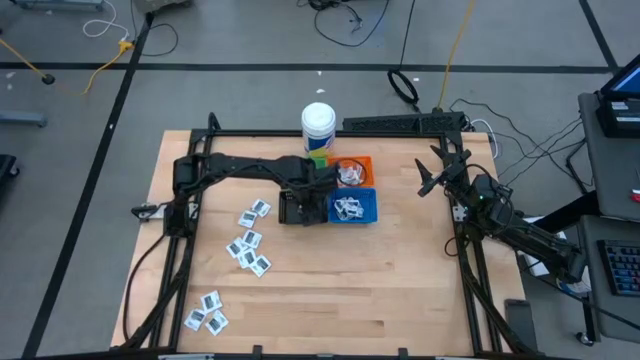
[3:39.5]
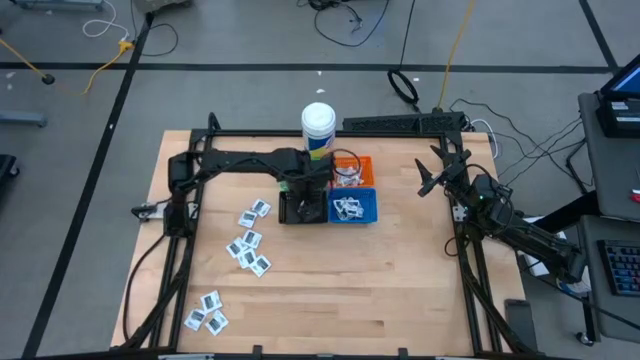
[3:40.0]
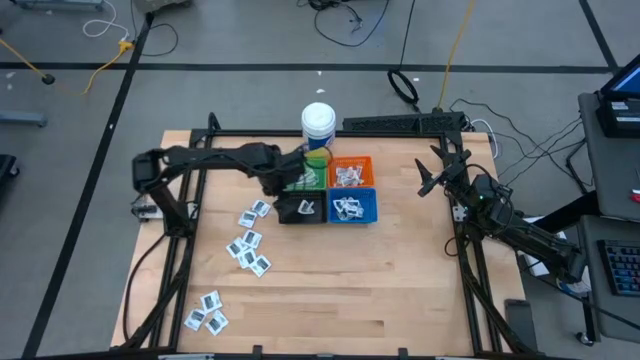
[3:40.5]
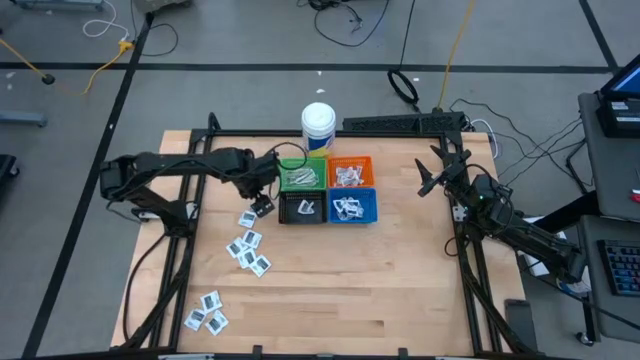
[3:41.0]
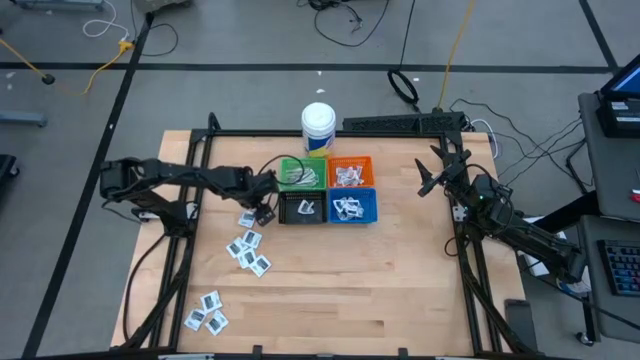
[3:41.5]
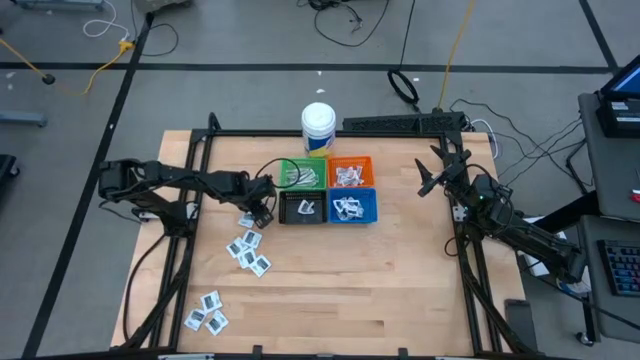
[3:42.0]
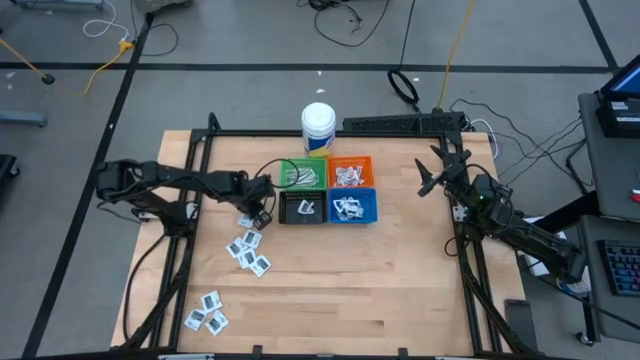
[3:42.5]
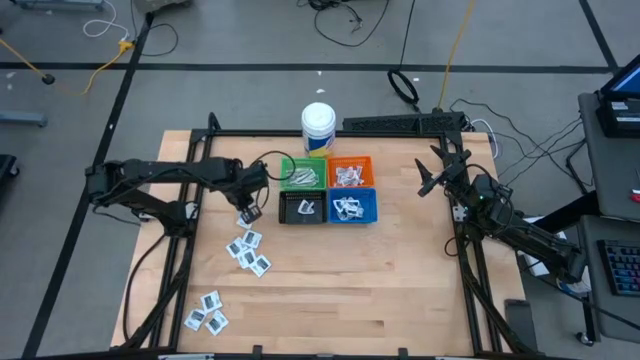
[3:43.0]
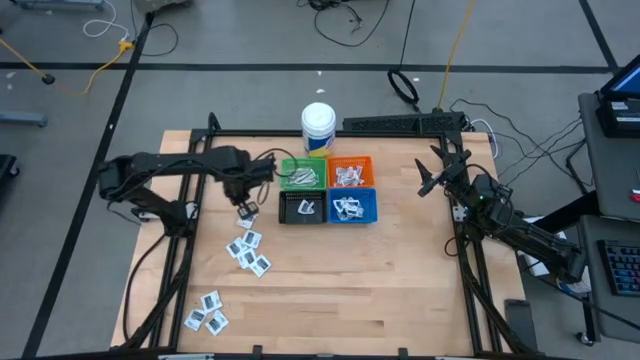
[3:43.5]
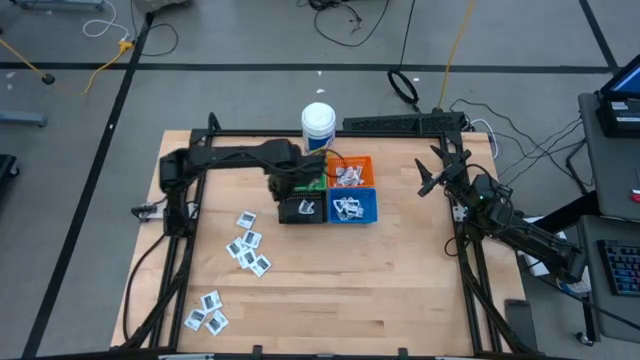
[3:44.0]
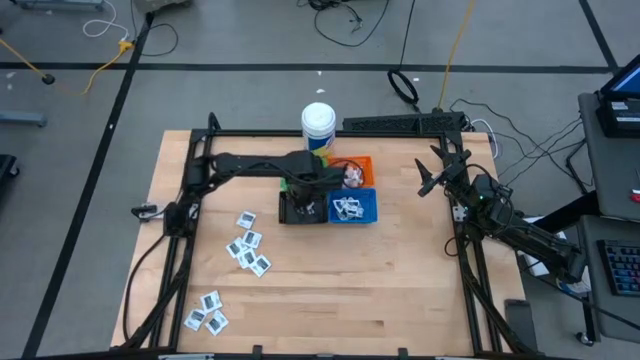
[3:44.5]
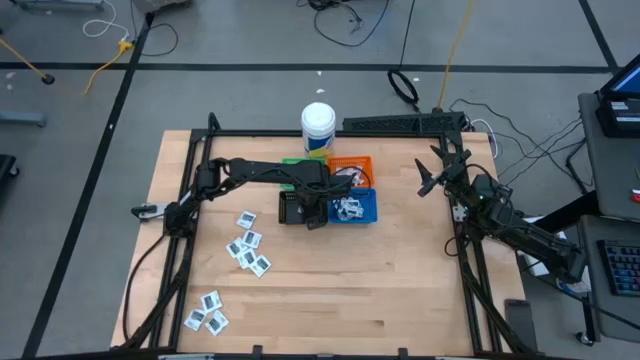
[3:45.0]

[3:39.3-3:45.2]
Task: Pick & Place First Aid Supplies
Put the black towelette pack into the black basket

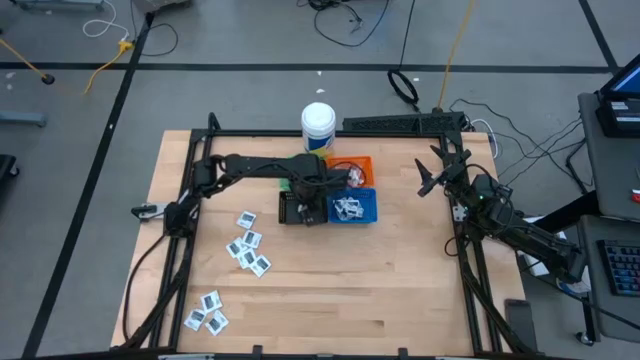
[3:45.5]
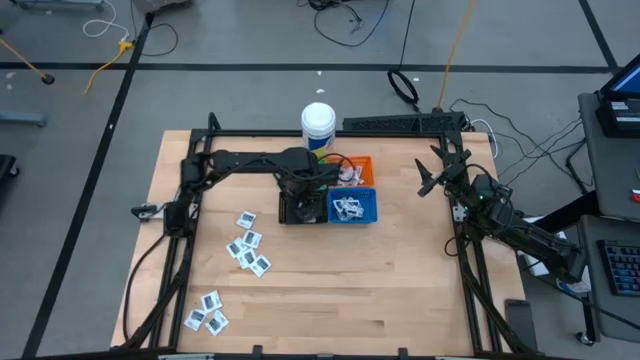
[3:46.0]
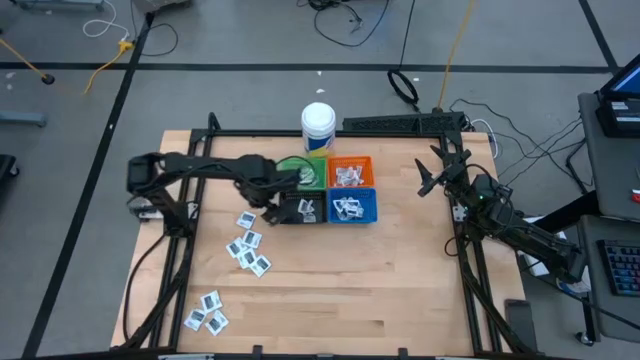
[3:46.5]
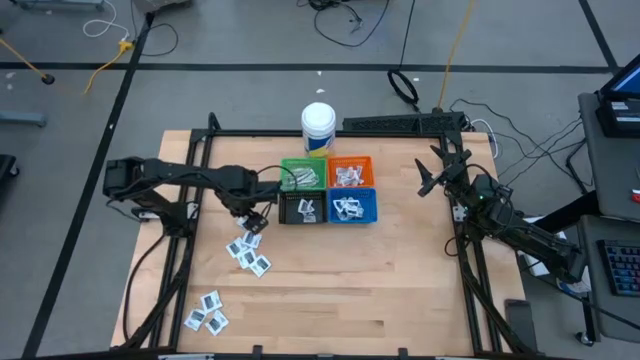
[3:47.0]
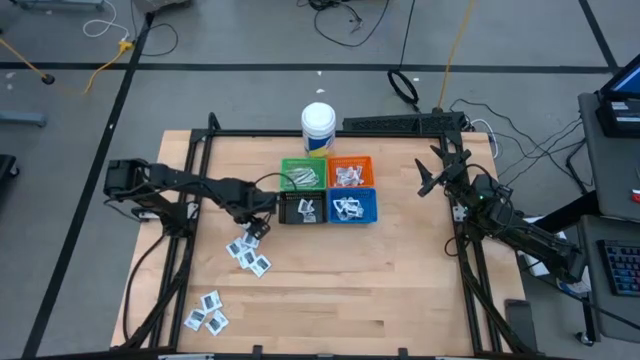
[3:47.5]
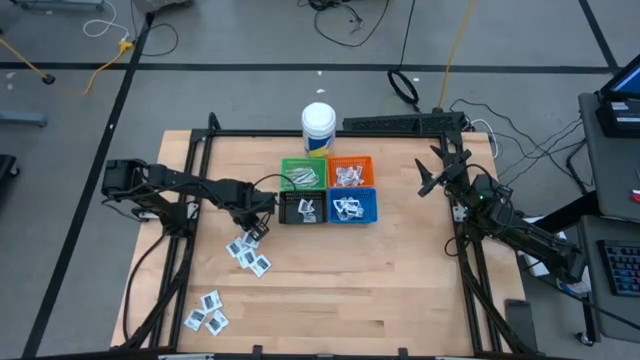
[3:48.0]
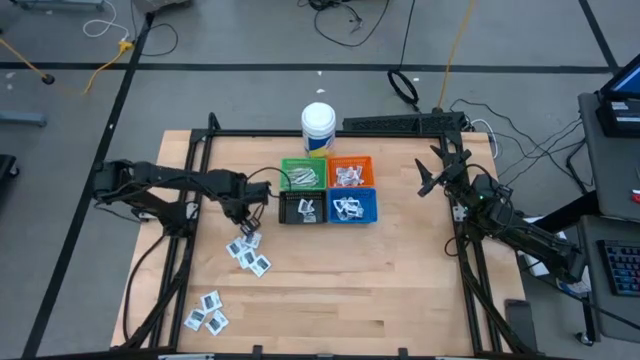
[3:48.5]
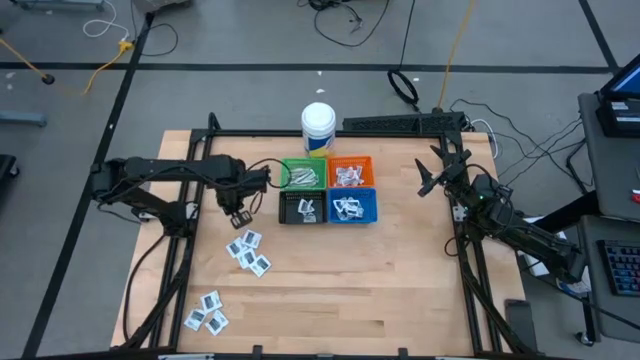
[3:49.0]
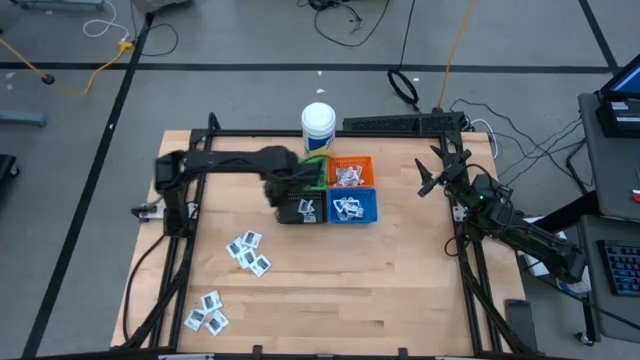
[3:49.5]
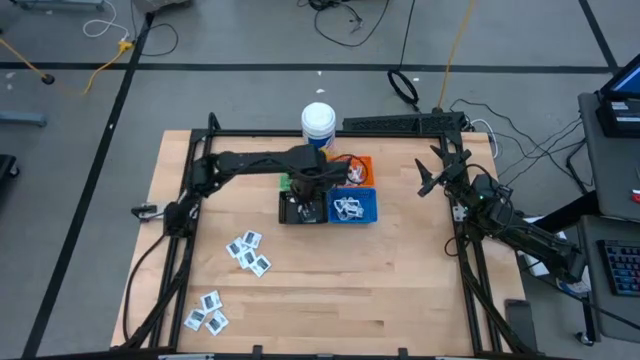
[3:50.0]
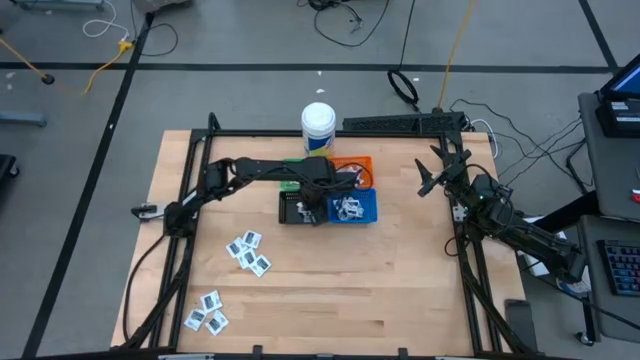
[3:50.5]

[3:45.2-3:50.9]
Put the black towelette pack into the black basket

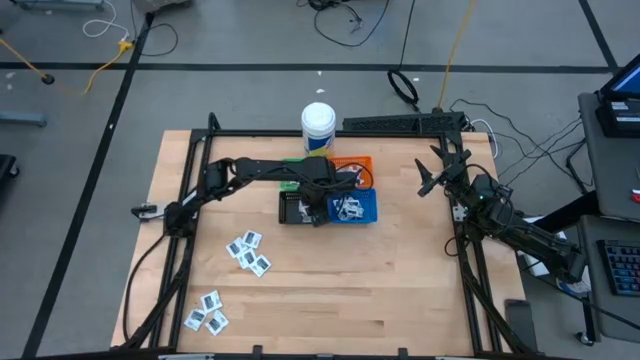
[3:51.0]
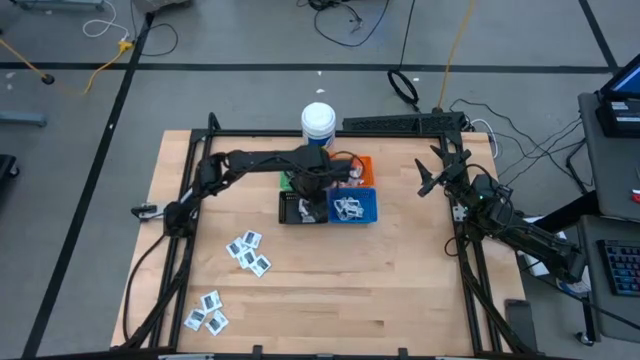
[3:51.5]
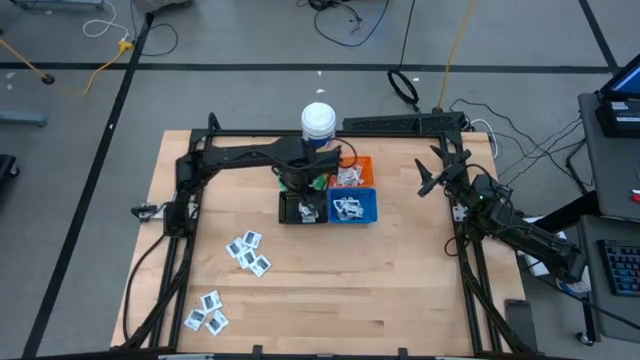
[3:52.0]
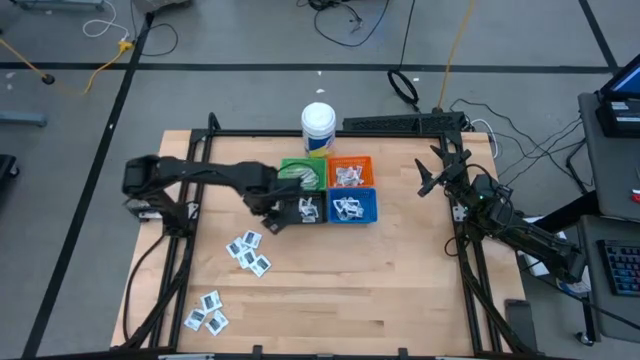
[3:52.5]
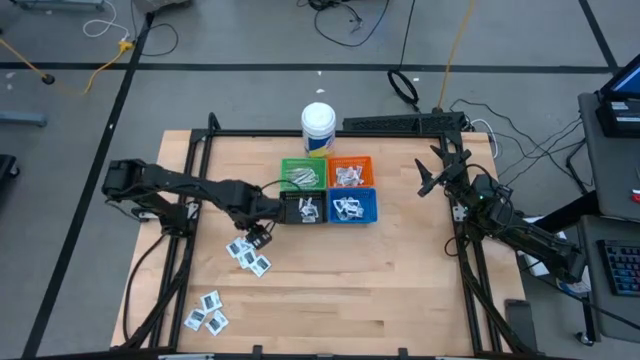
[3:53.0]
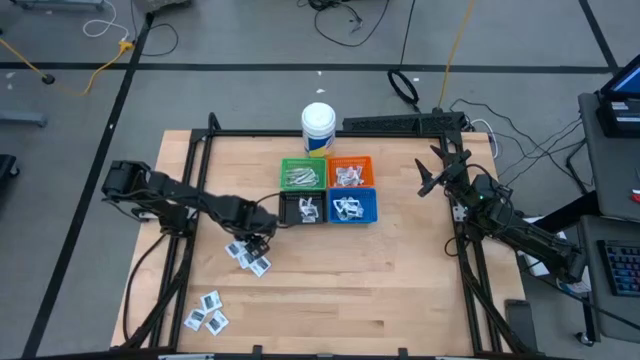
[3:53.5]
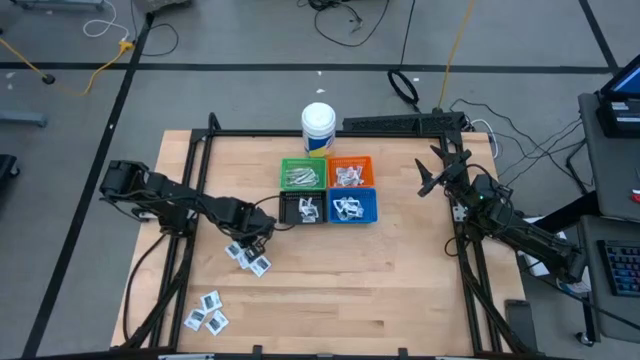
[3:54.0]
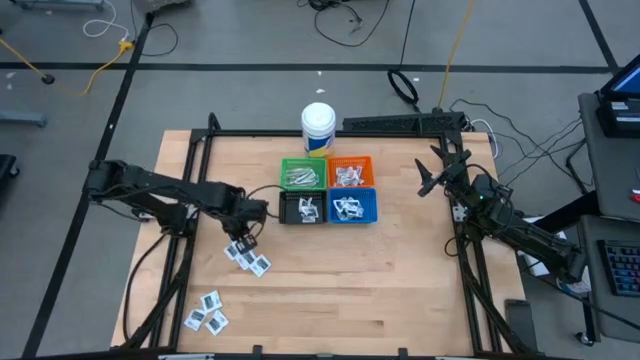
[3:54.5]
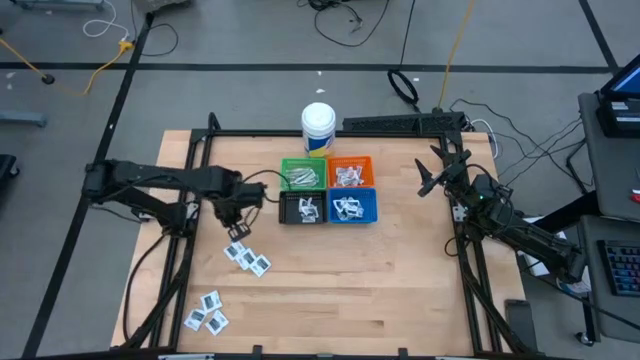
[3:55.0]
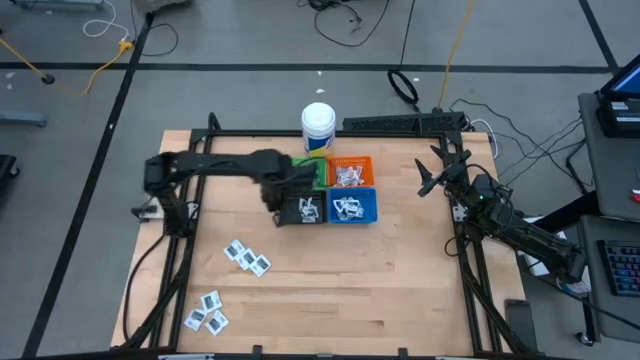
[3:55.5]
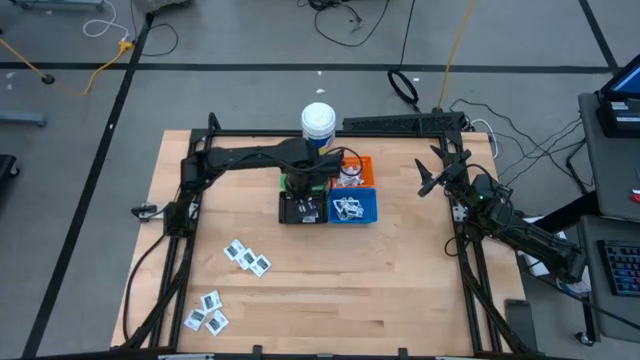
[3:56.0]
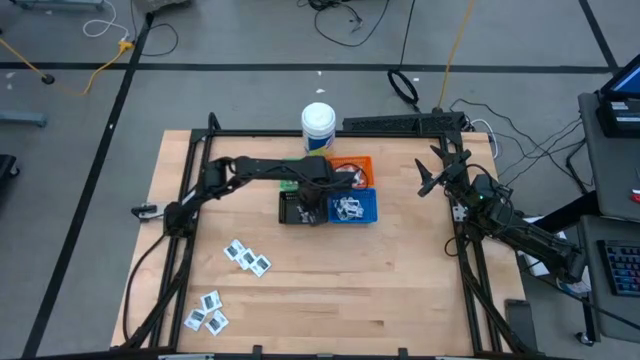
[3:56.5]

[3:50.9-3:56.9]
Put the black towelette pack into the black basket

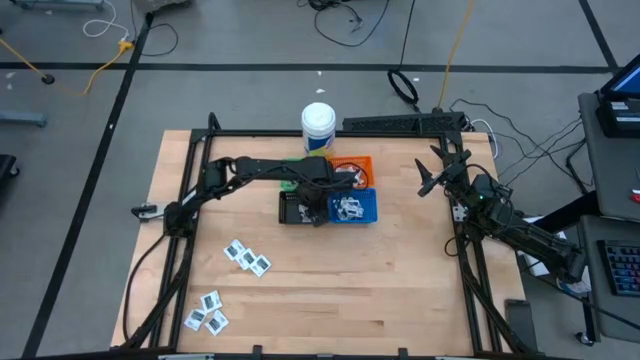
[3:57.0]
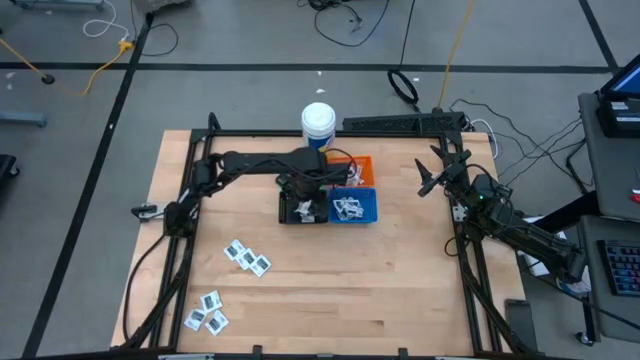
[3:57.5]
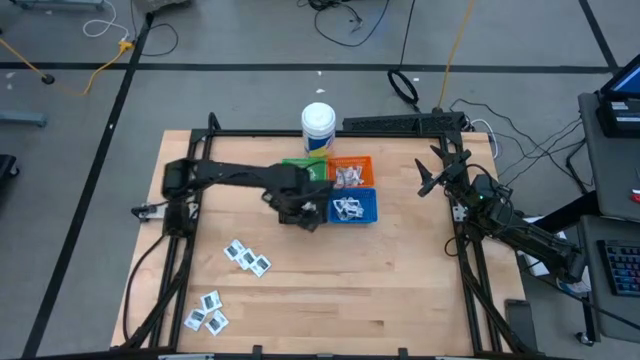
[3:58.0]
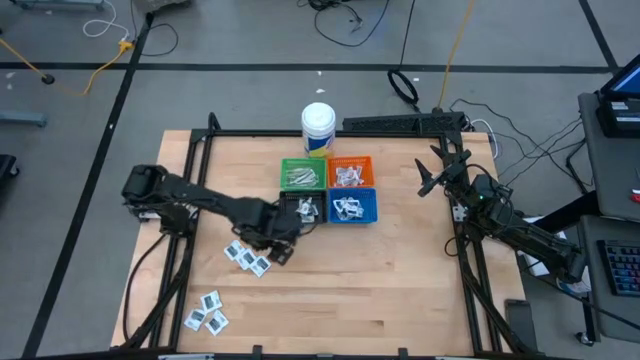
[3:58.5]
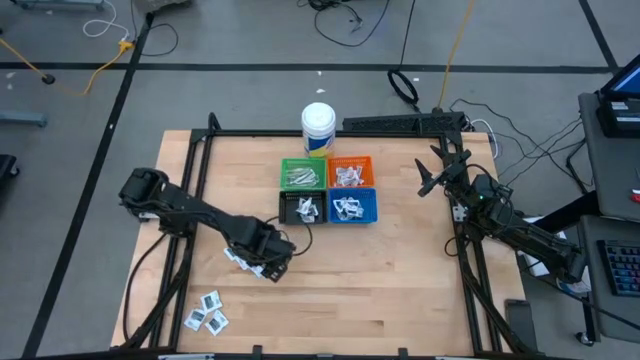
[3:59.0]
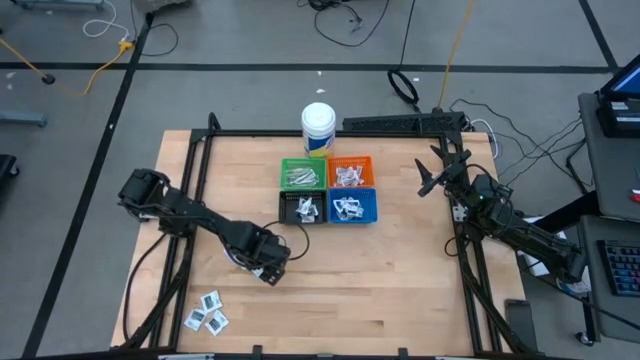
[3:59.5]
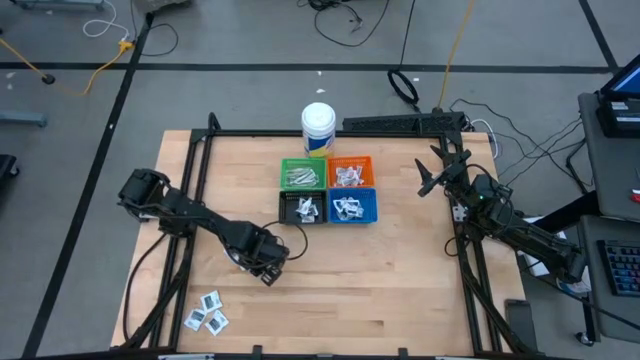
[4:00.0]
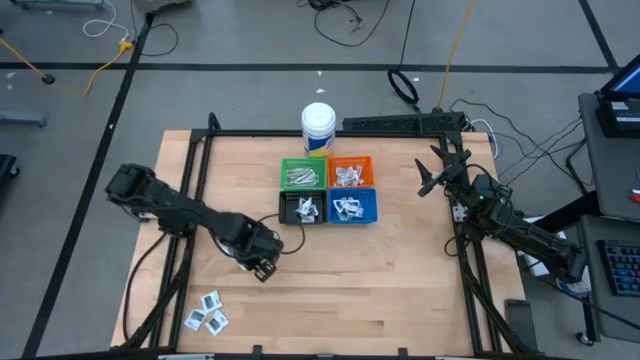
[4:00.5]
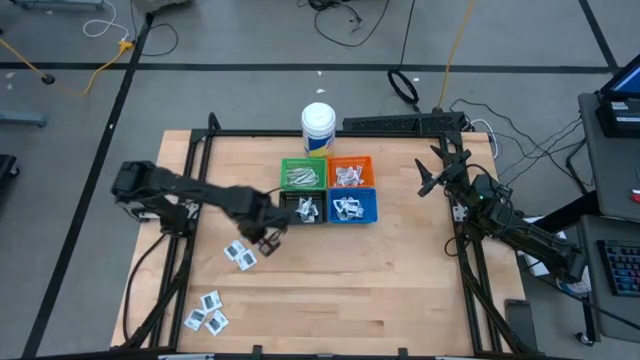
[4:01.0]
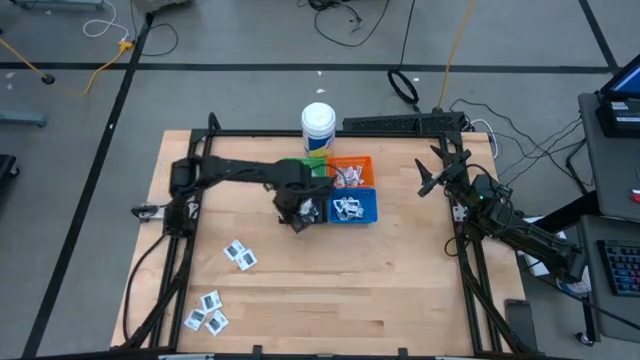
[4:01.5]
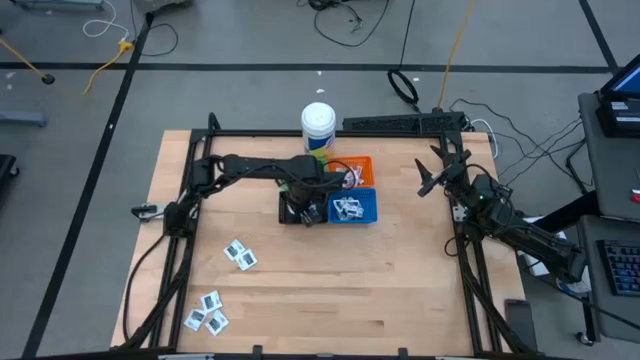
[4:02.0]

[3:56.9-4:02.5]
Put the black towelette pack into the black basket
